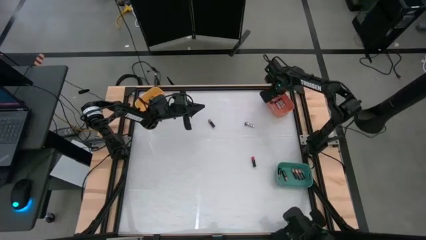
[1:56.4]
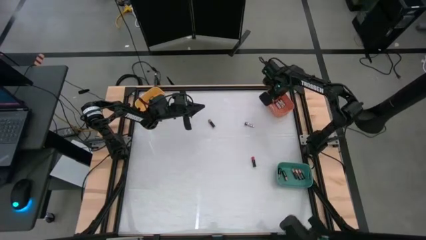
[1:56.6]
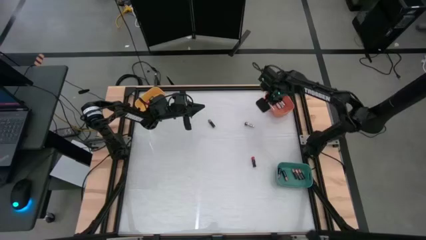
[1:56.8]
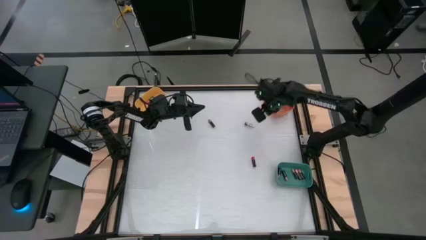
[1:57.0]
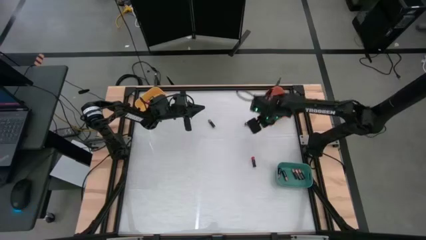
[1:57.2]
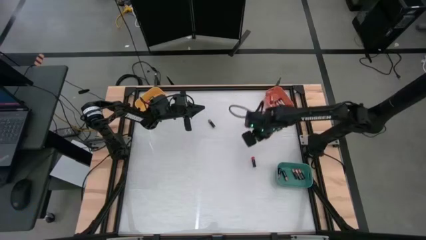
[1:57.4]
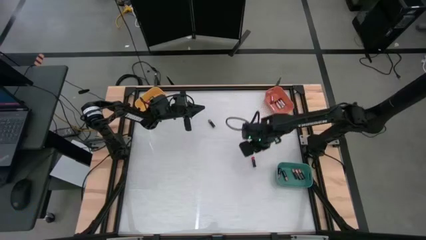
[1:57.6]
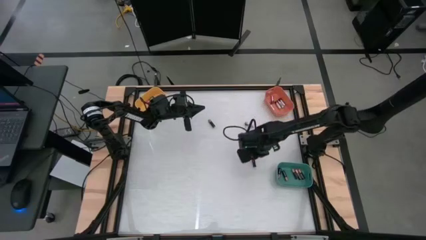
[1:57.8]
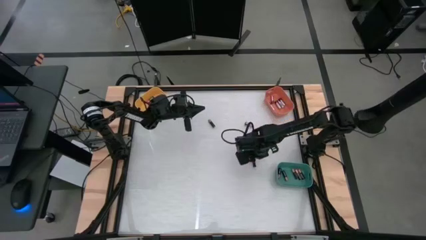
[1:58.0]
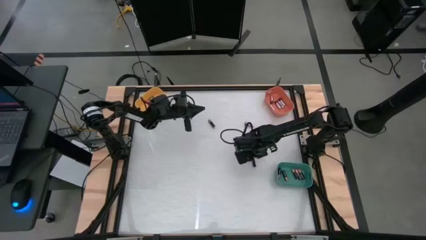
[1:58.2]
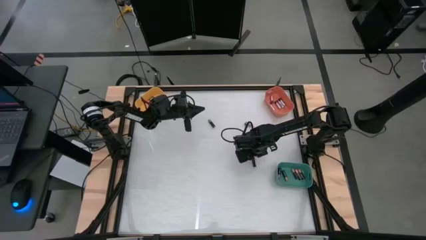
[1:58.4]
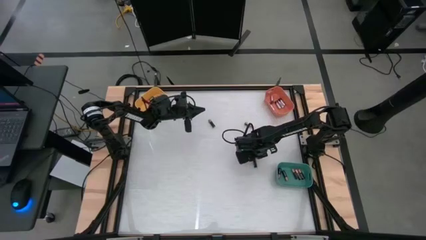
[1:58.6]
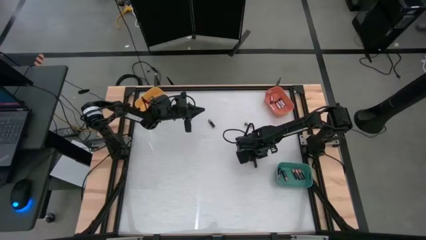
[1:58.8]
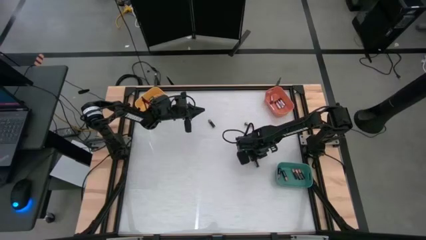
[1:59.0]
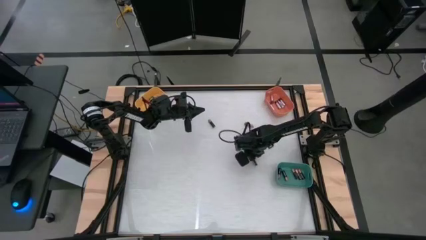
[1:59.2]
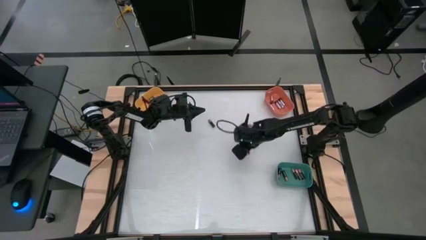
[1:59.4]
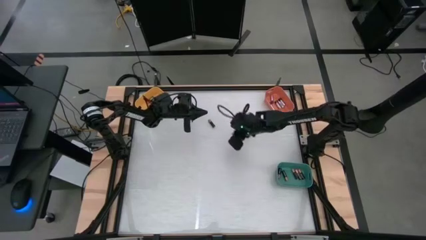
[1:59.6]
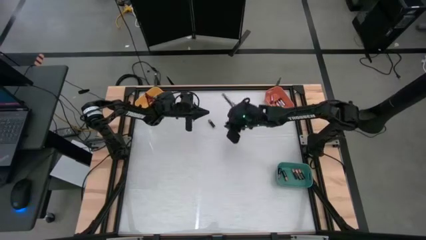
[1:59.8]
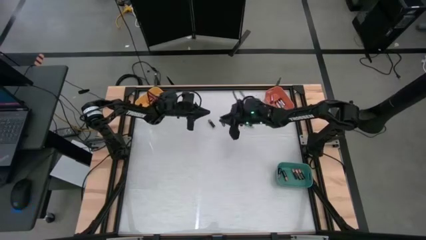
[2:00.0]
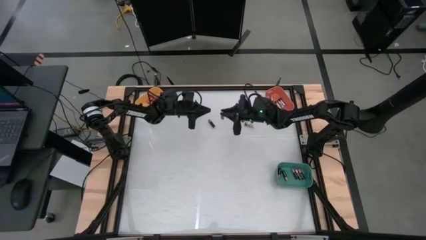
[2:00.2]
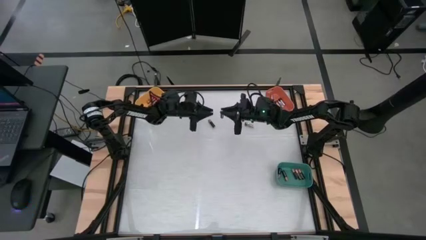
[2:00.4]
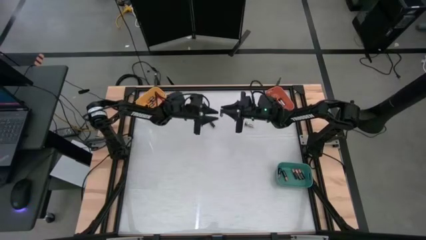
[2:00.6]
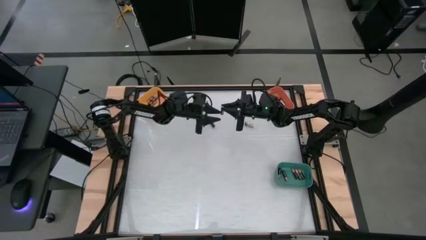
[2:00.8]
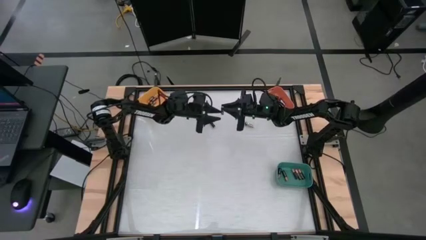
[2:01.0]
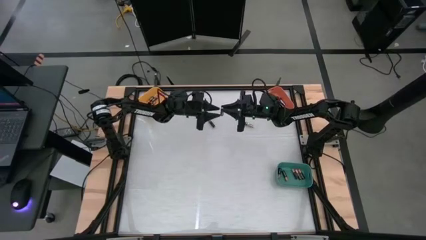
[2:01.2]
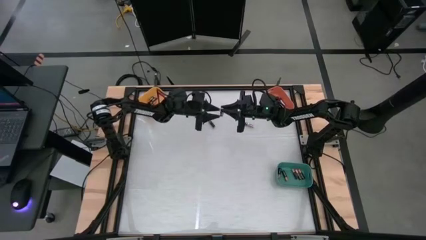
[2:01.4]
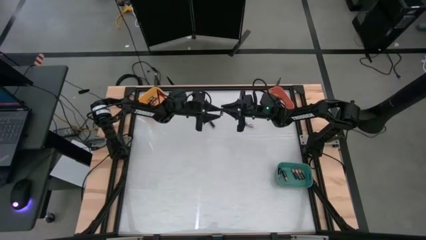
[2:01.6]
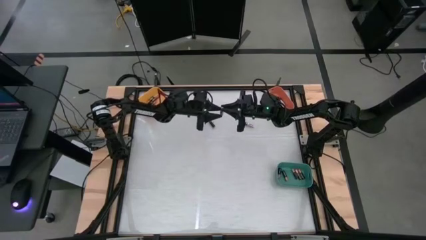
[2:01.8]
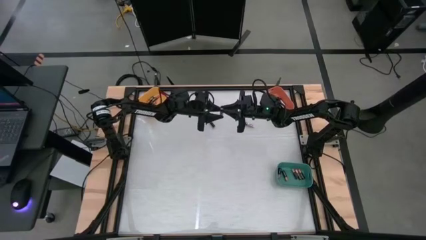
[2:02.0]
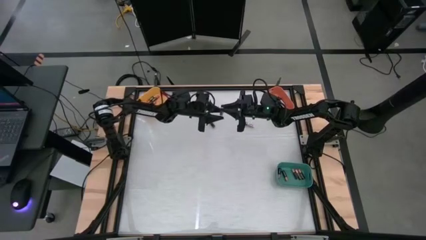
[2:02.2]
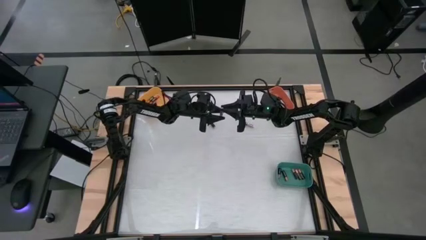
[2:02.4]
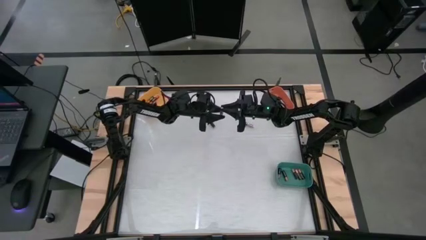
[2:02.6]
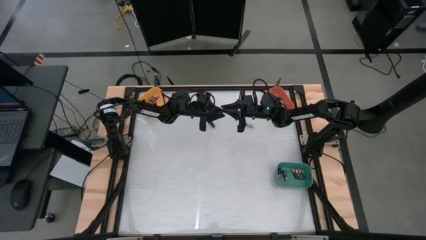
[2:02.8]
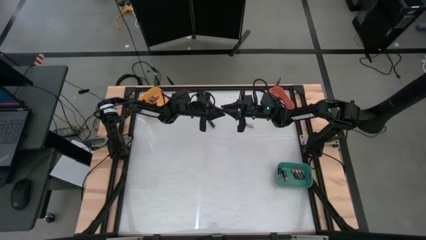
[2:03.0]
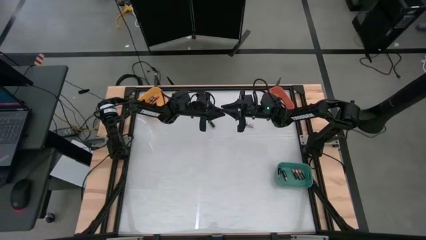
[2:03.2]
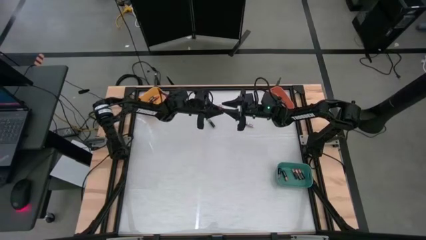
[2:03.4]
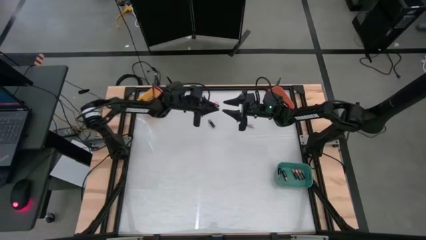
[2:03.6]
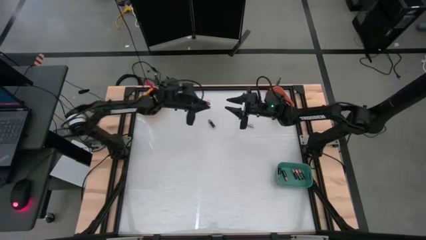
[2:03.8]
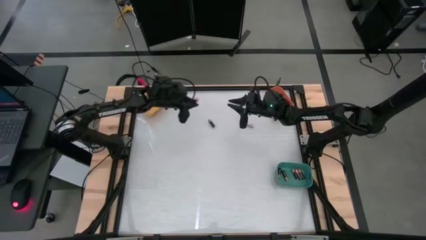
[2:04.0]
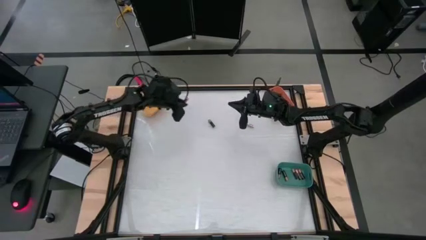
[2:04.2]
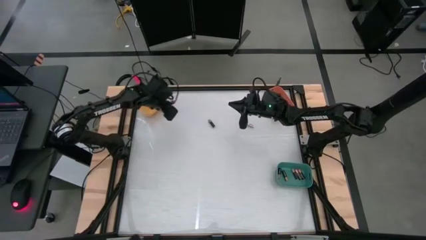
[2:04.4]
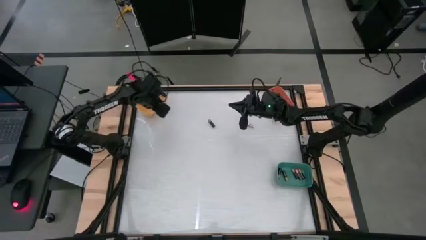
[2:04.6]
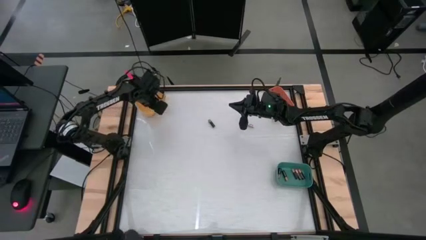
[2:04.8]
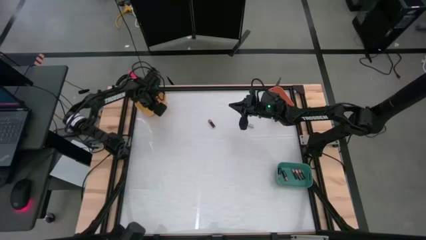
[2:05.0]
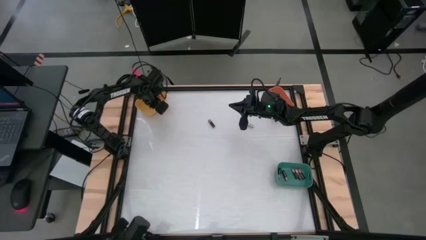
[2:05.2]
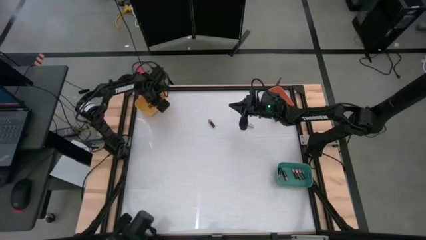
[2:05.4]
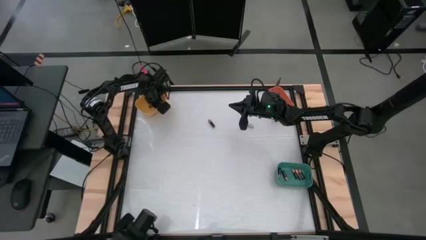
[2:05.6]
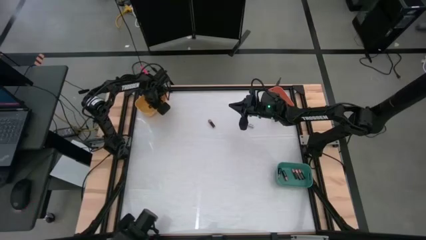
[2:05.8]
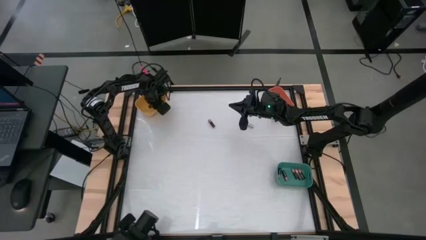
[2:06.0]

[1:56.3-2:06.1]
Task: Sort batteries
Put the red battery into the yellow bin

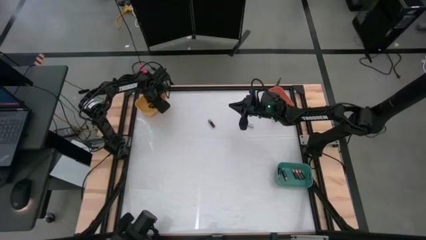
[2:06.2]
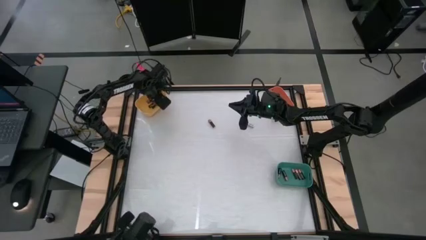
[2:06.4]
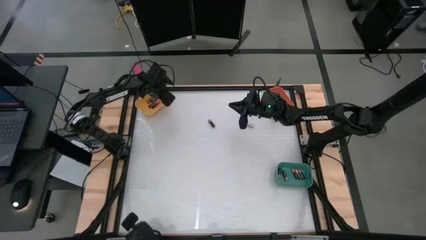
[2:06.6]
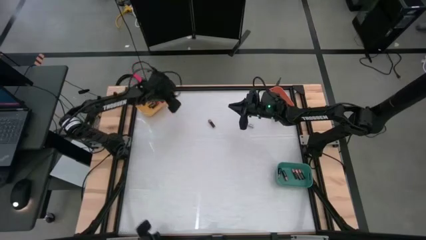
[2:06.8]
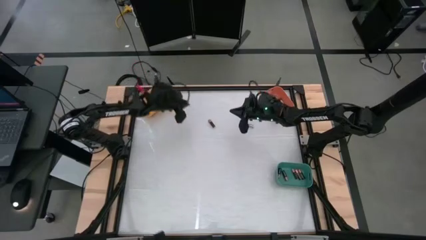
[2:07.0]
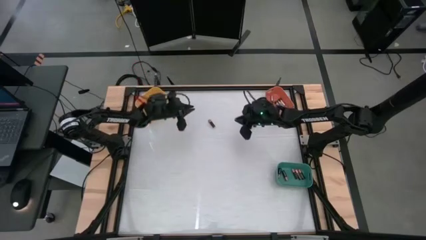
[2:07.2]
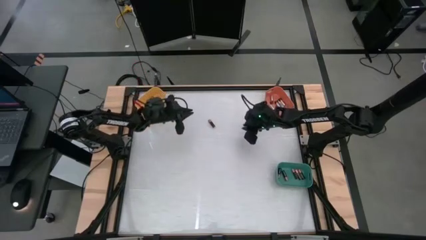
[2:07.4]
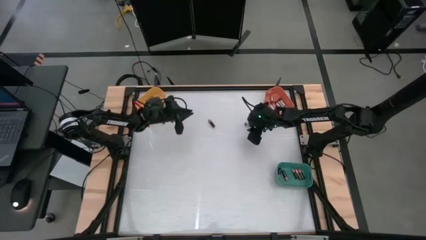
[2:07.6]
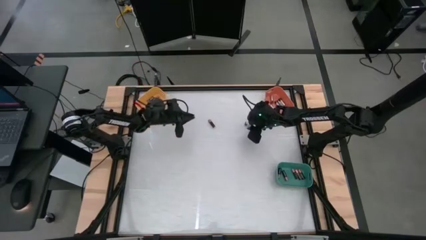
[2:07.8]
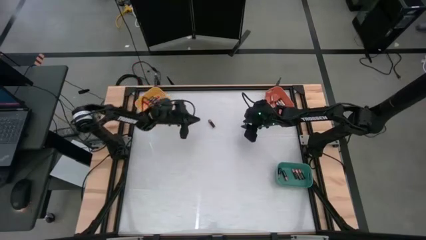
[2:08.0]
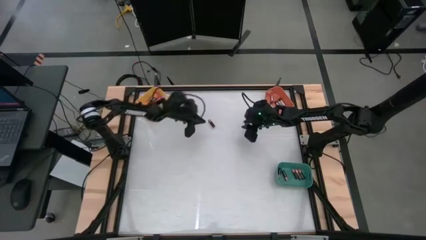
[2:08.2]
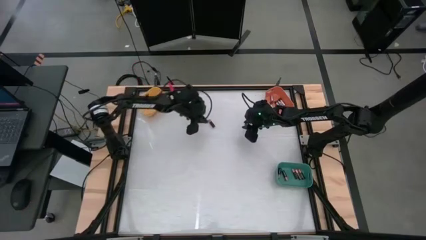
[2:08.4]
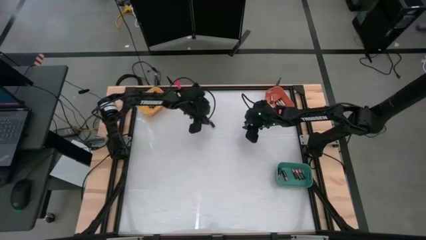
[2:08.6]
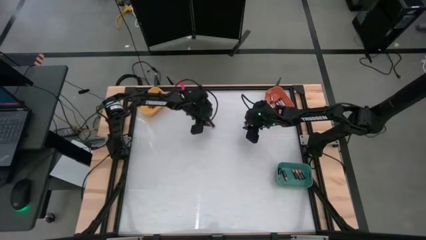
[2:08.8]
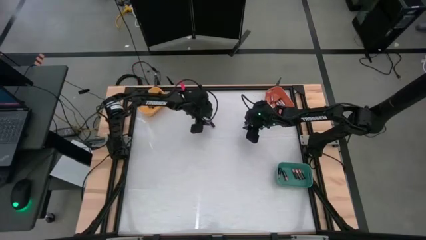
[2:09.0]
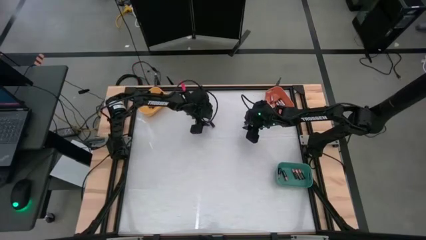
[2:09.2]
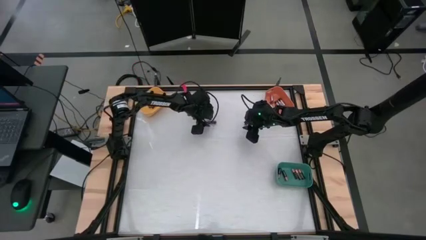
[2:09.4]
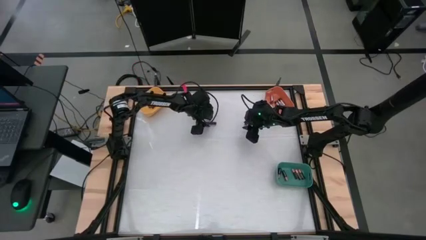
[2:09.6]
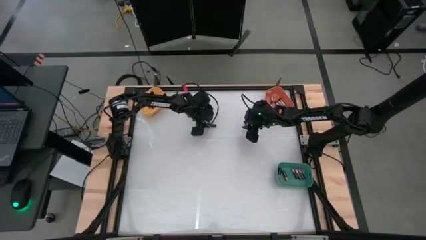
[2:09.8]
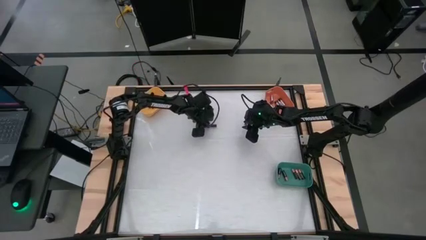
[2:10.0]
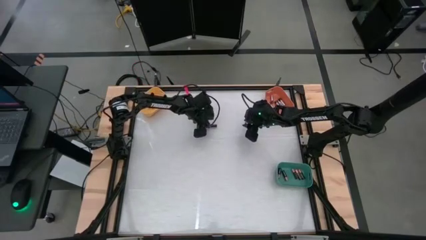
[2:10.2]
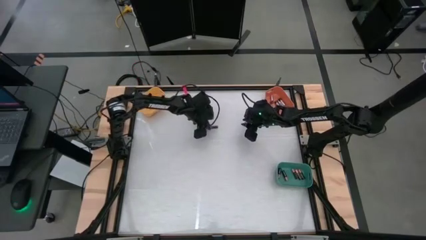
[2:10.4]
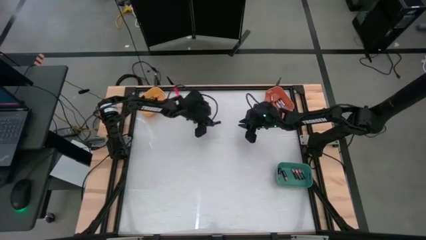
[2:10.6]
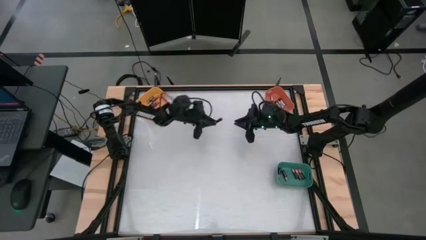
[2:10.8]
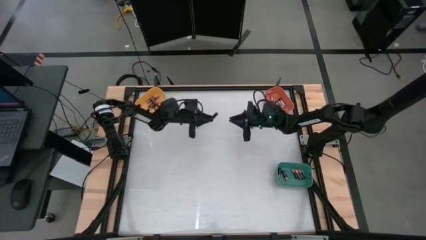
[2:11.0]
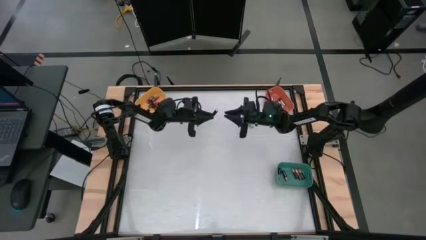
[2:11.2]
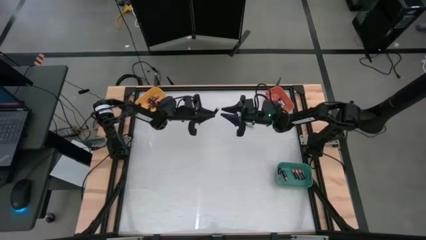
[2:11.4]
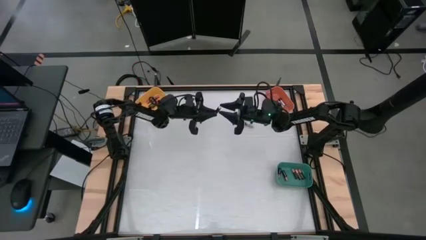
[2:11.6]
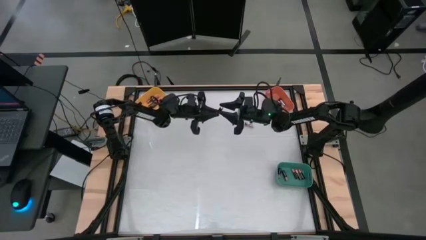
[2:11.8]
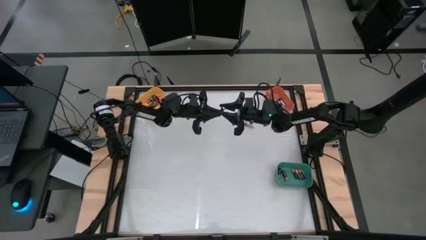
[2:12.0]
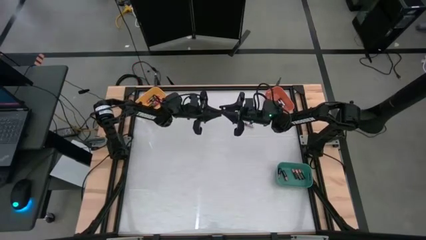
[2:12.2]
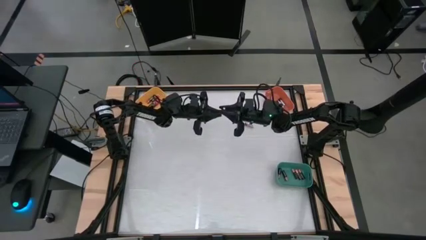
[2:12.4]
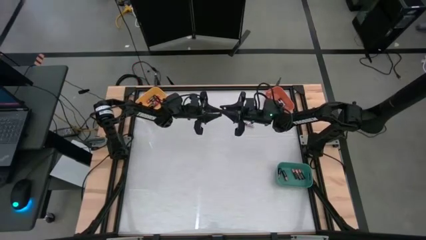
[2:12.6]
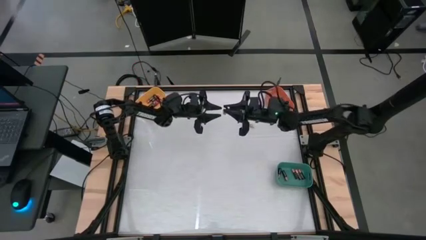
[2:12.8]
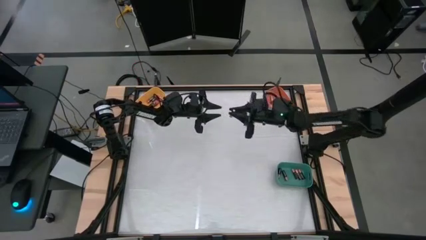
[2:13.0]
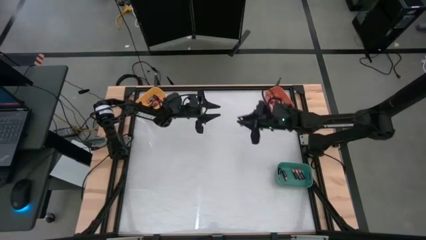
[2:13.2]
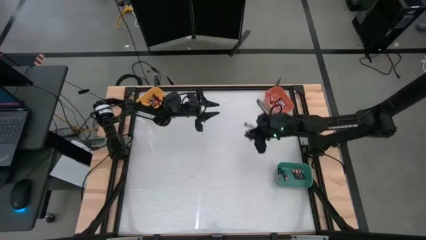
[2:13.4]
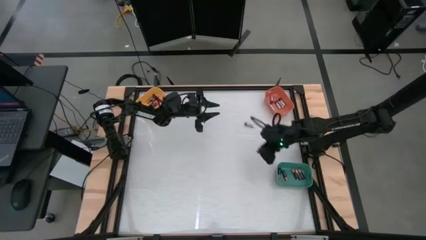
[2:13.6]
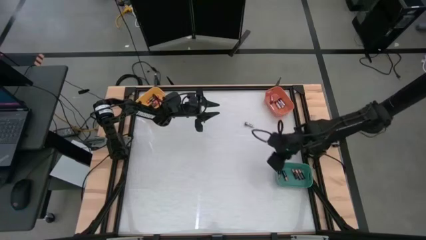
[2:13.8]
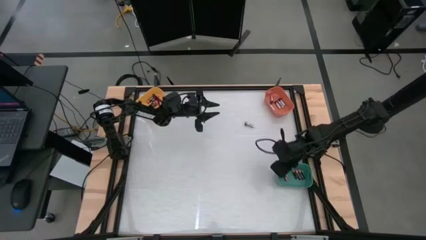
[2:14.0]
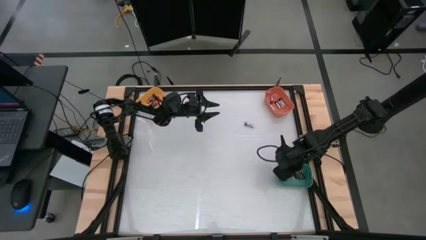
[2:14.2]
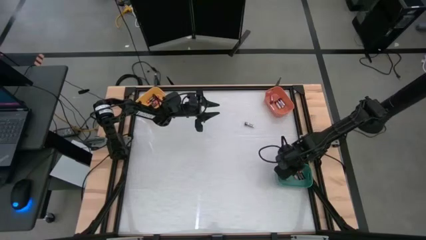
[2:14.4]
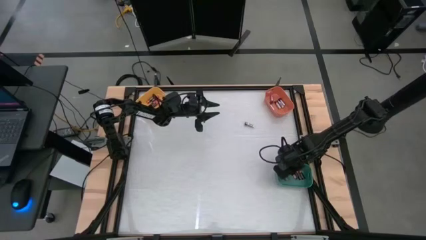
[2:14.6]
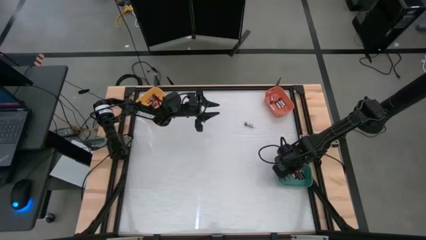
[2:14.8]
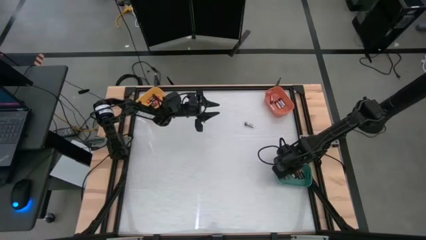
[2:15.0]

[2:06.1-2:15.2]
Put the brown battery into the green bin
